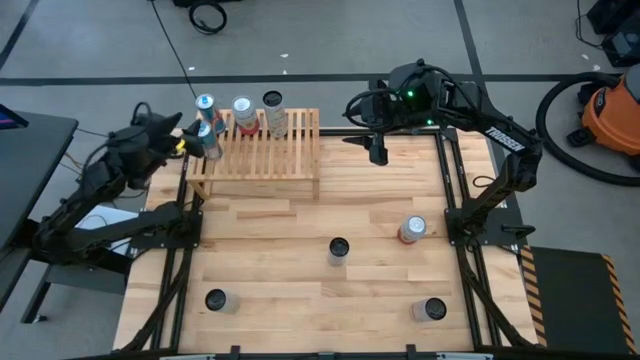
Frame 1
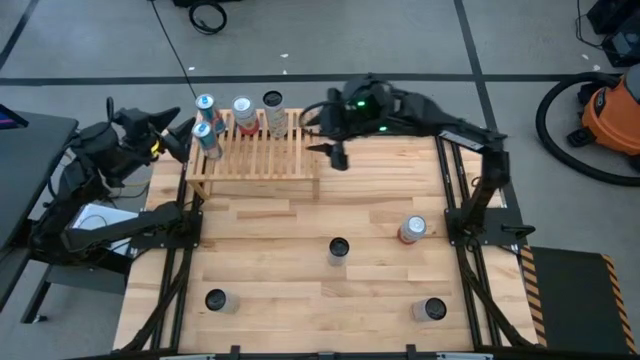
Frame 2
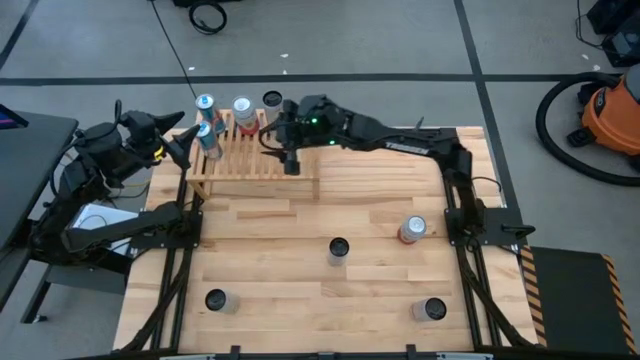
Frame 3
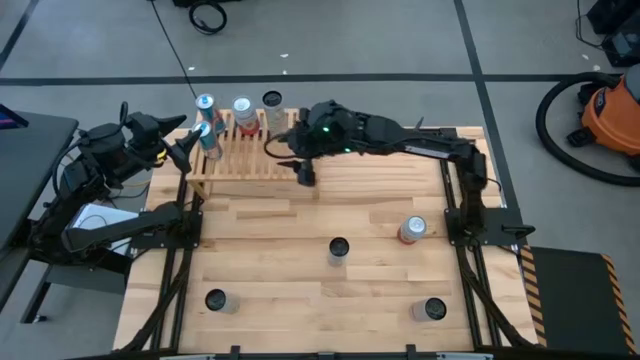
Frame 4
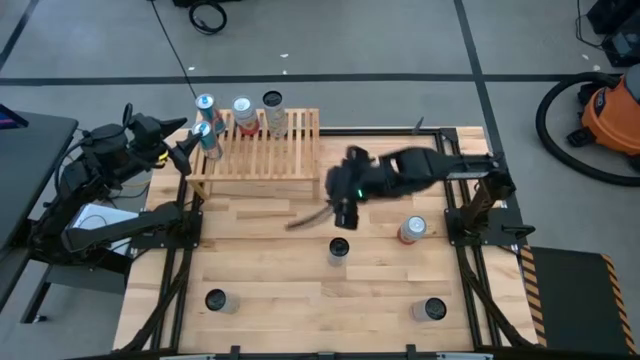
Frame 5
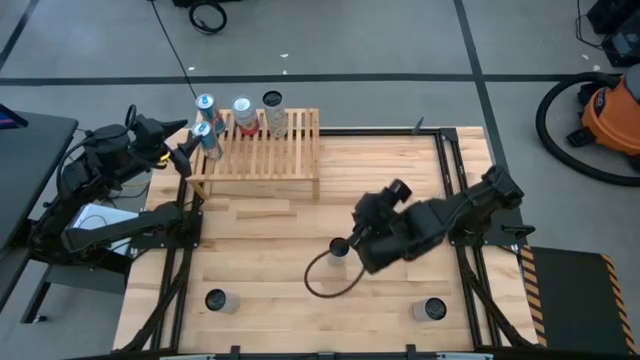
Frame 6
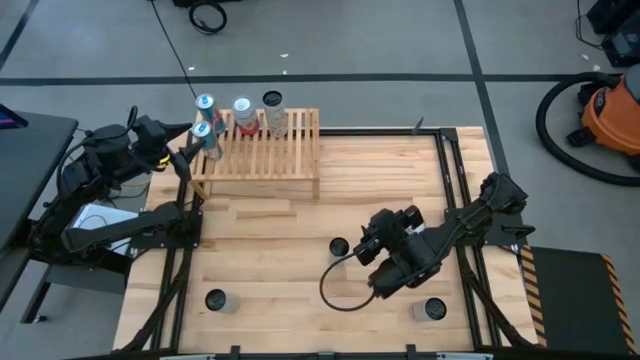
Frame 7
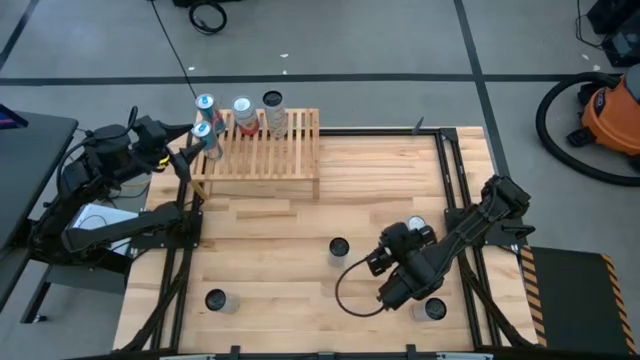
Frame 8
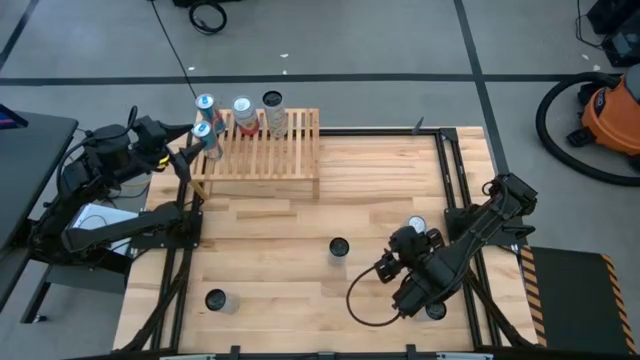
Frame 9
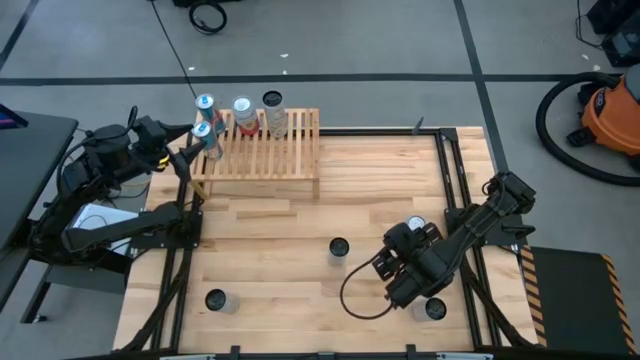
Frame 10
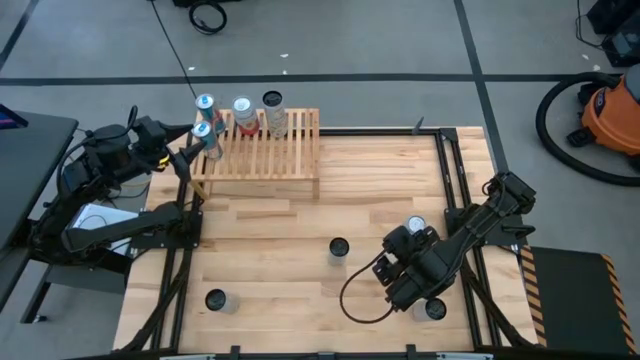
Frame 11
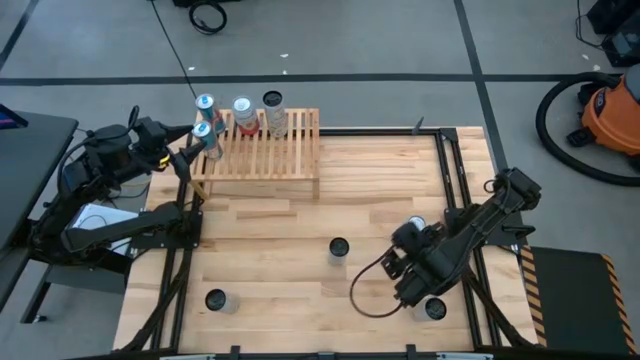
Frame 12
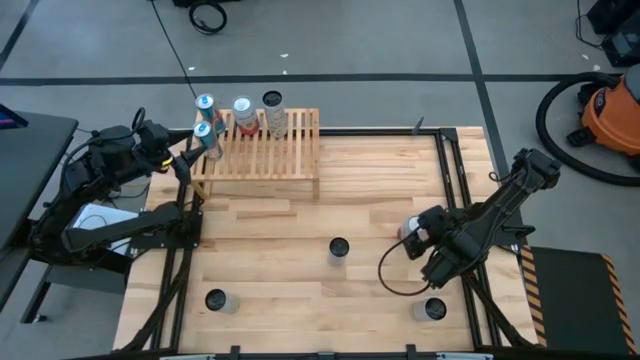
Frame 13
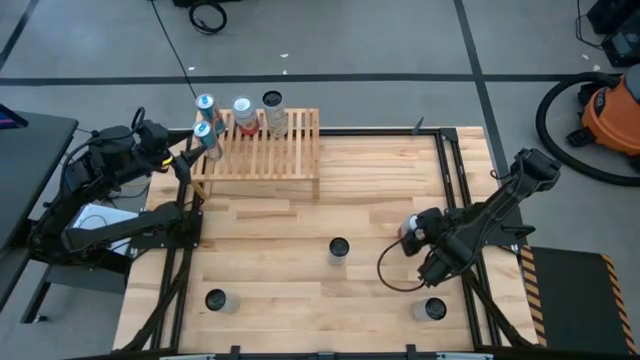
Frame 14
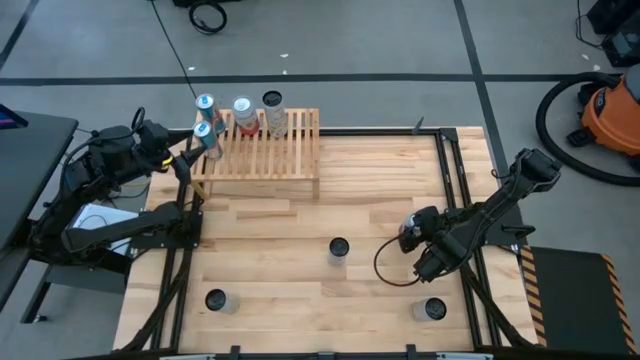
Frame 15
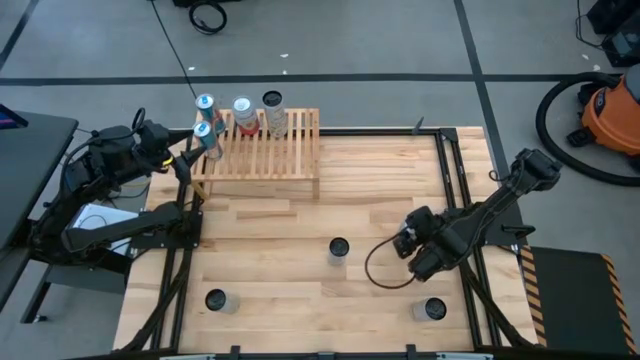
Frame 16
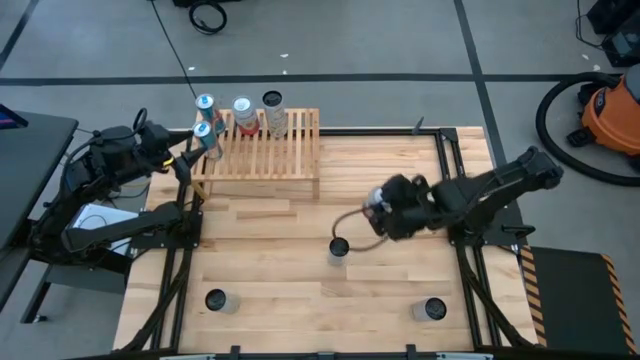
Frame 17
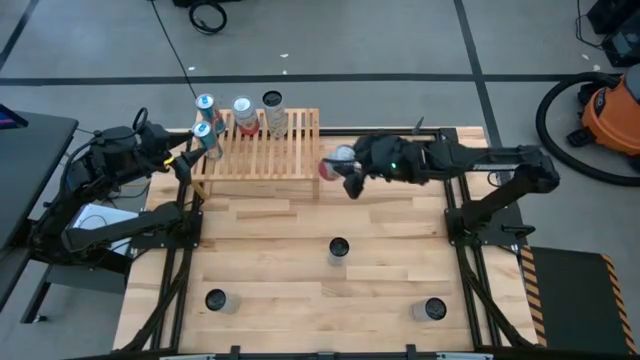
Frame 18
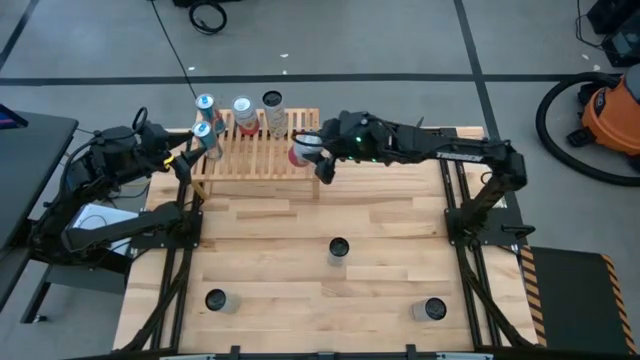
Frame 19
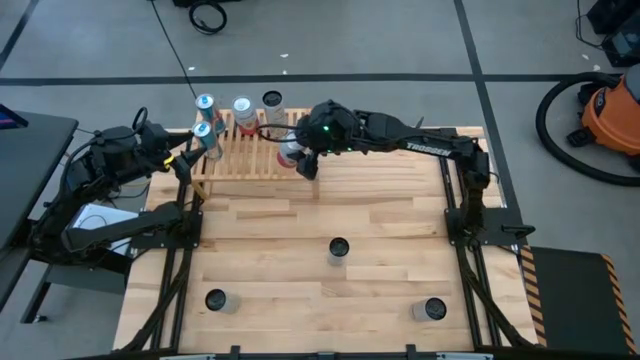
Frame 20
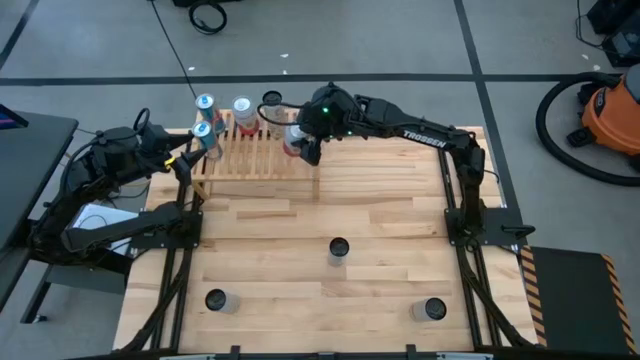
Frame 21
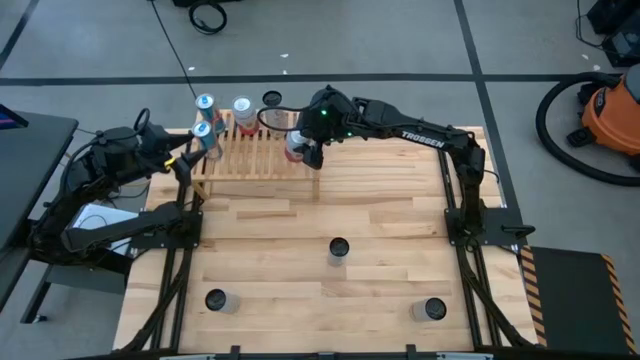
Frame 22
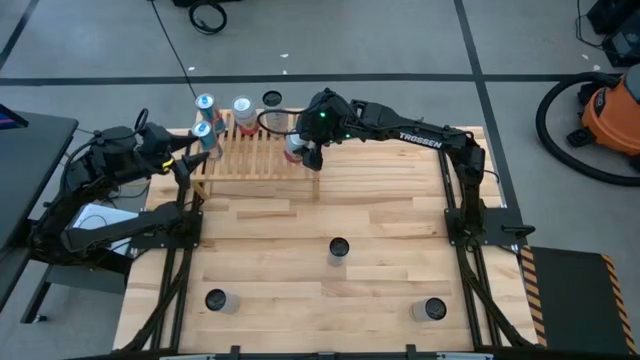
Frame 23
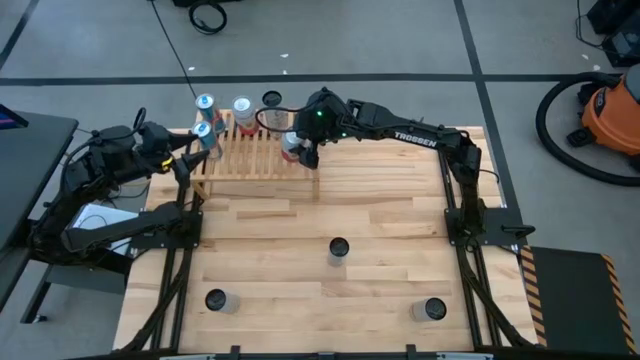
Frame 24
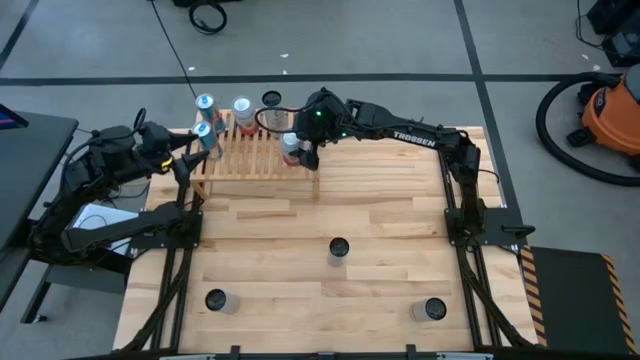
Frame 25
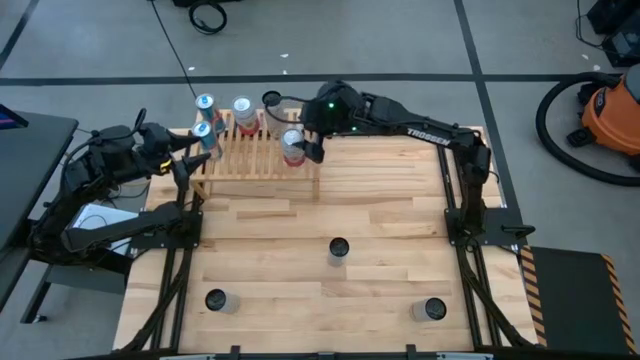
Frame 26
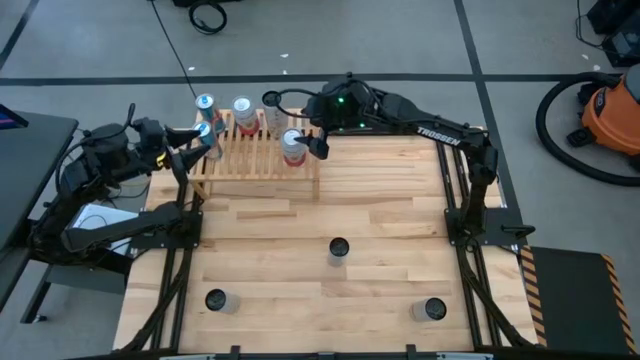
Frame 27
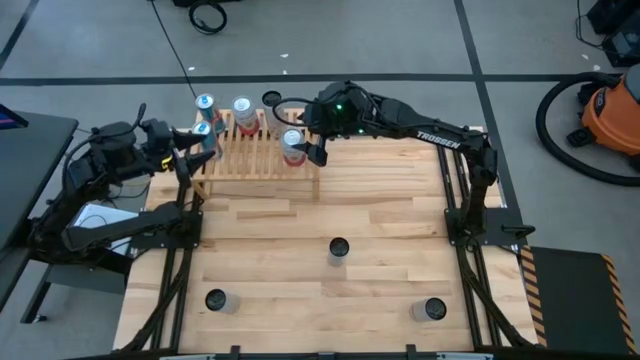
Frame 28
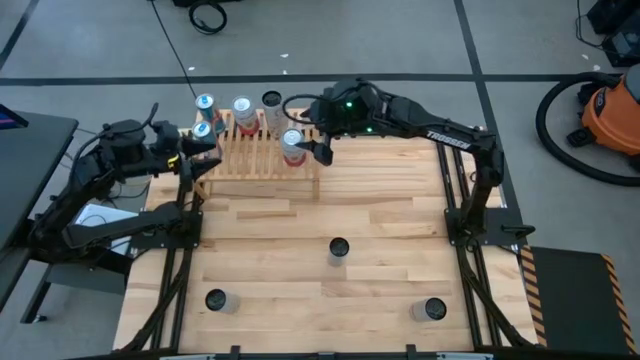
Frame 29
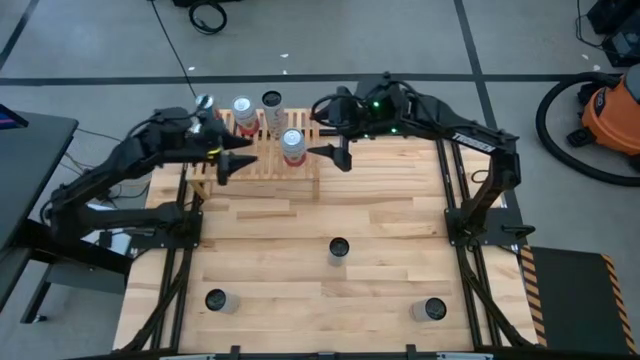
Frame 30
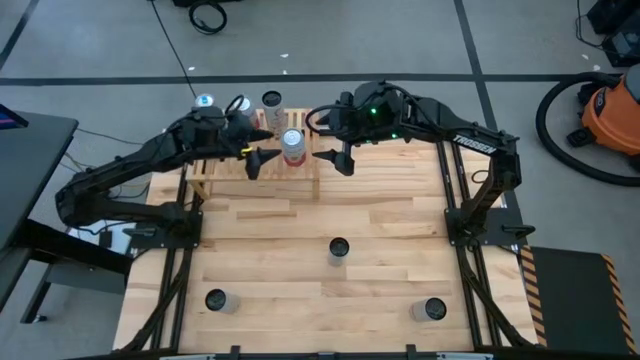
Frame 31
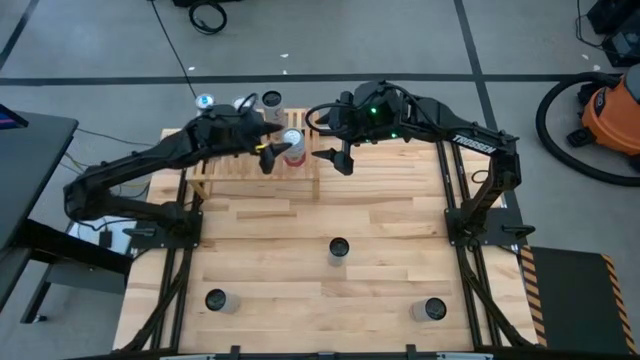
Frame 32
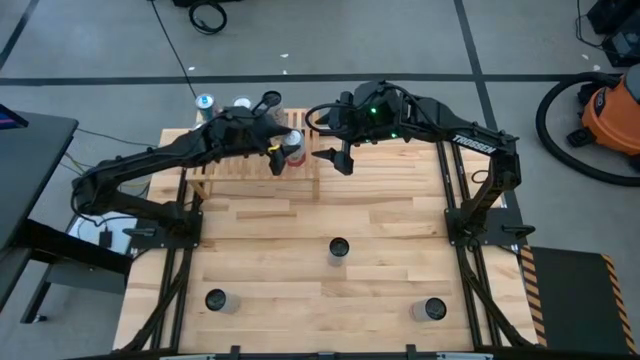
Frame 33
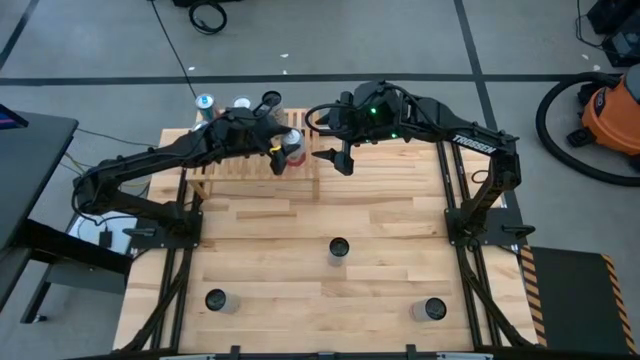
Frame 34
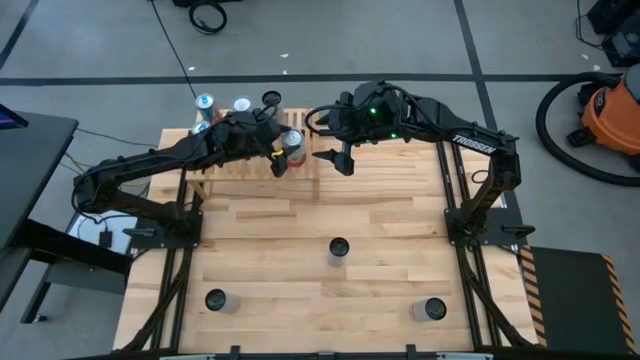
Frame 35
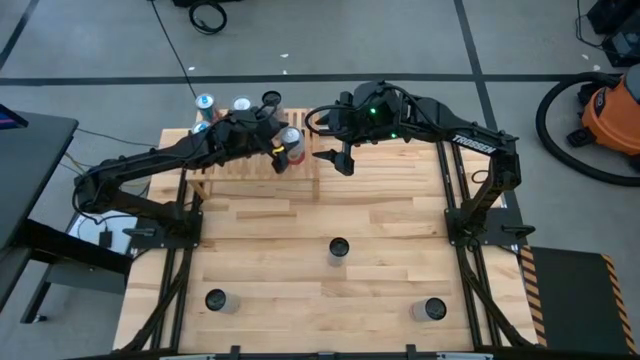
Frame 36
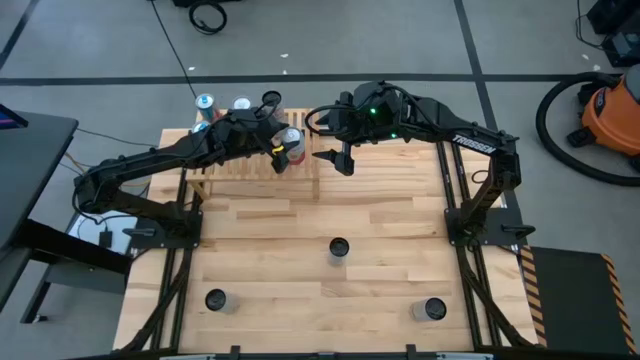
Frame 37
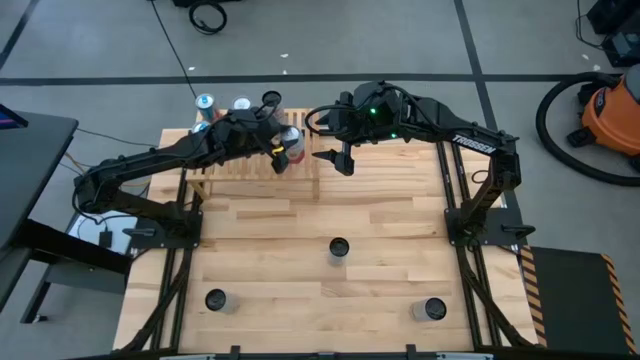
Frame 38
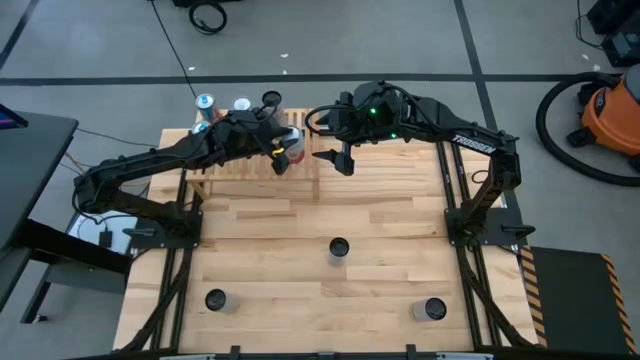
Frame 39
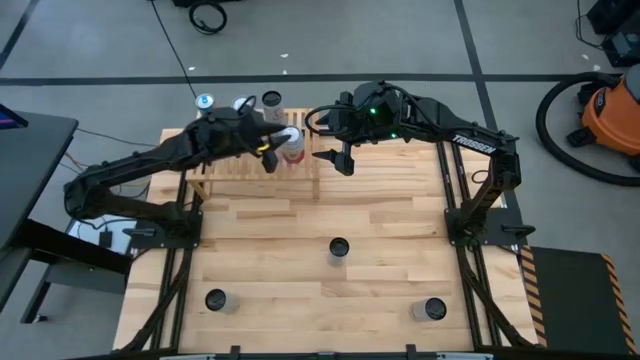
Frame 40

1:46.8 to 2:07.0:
Task: Place canned beverage on shelf
Put the pink and white soda can on the shelf aligned with the other pink and white soda can

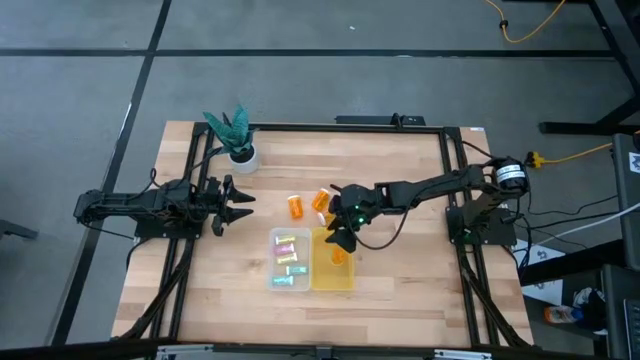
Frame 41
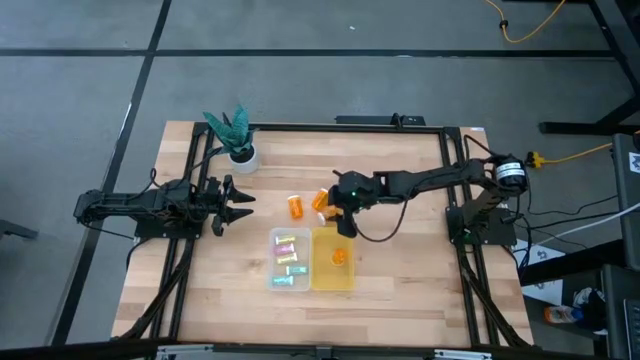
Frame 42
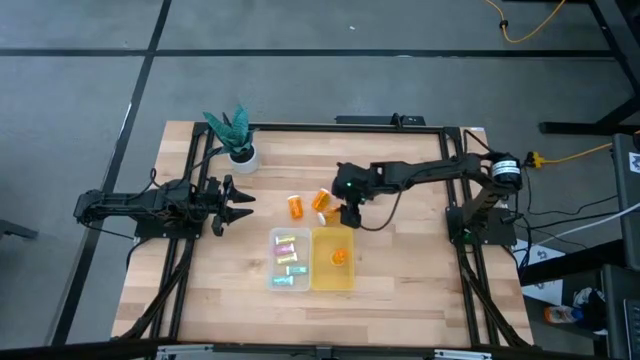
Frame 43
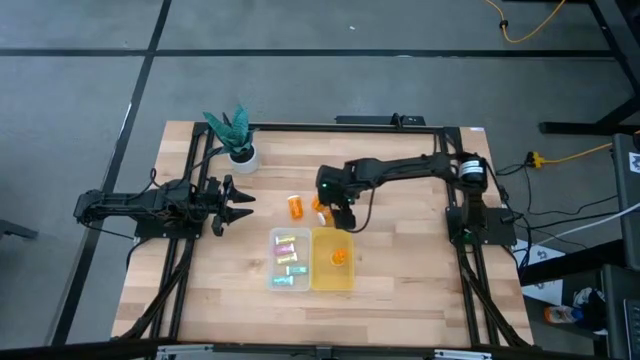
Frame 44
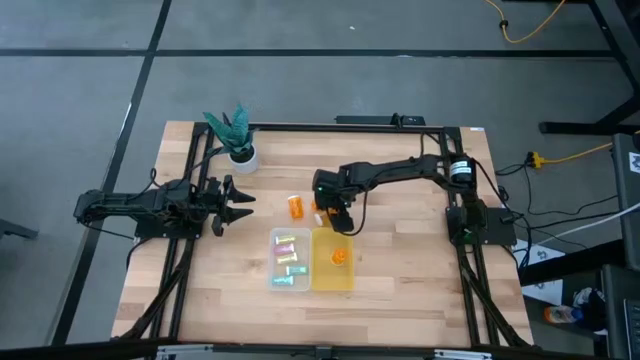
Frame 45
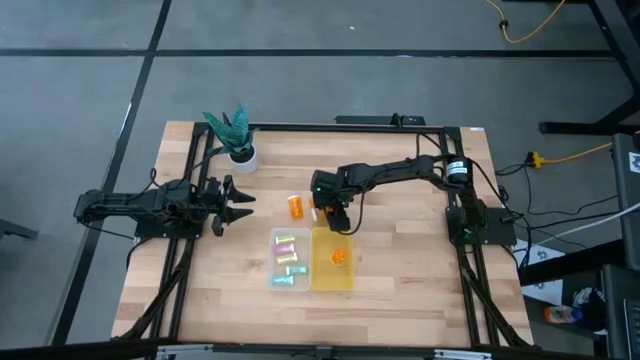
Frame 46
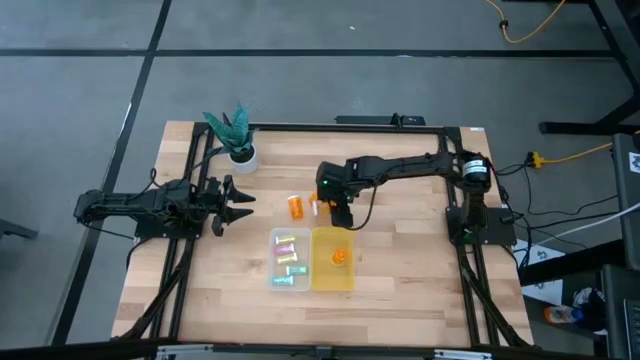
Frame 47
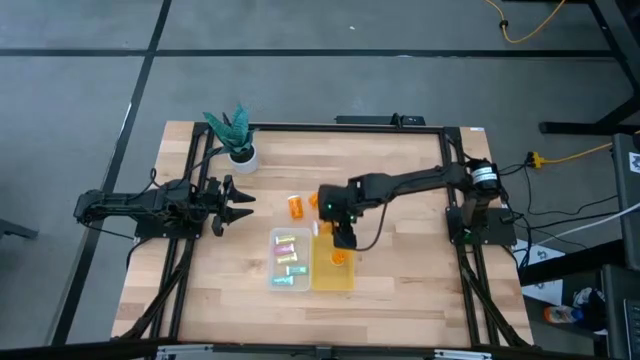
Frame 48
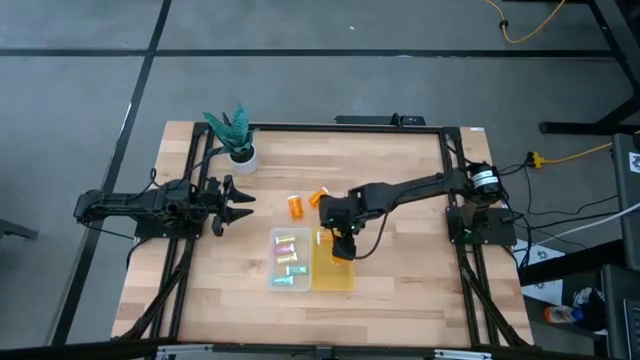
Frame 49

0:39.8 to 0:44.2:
Task: Pick and place medicine bottles into bin by pill shape (circle, oval)
Put the orange capsule bottle into the yellow bin
